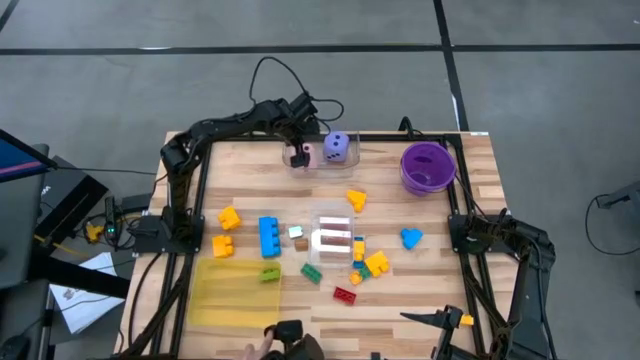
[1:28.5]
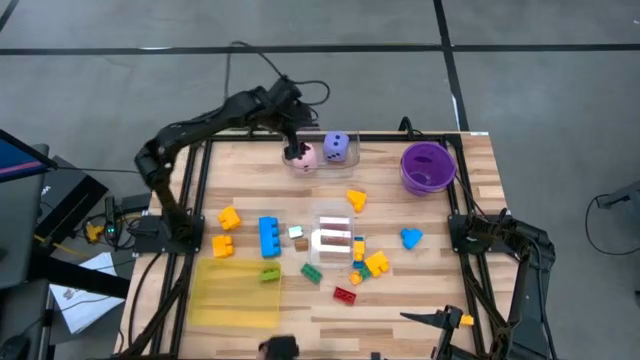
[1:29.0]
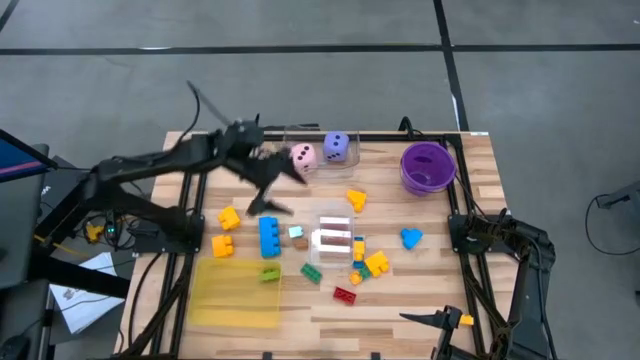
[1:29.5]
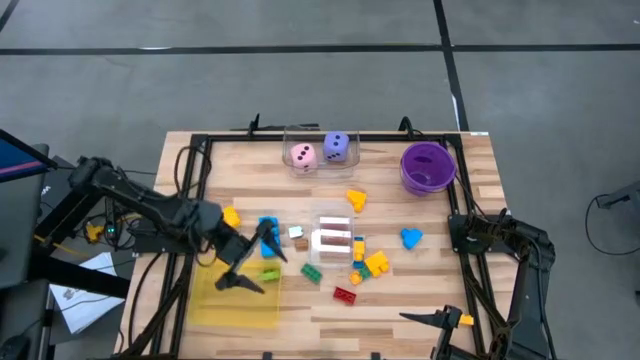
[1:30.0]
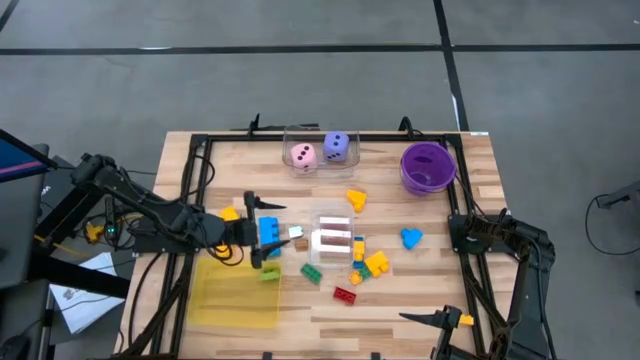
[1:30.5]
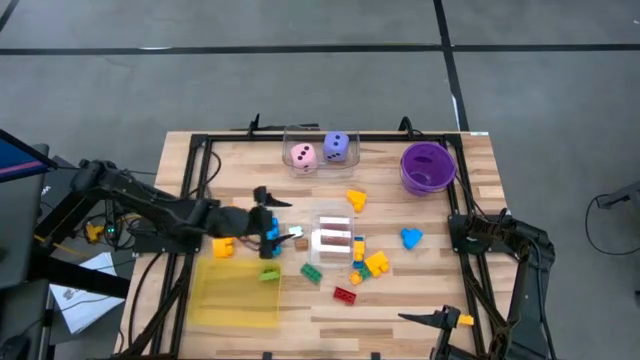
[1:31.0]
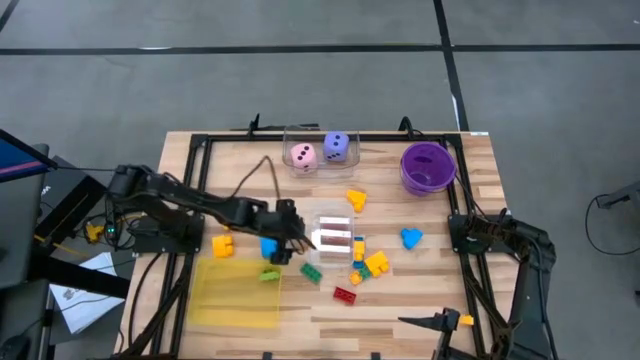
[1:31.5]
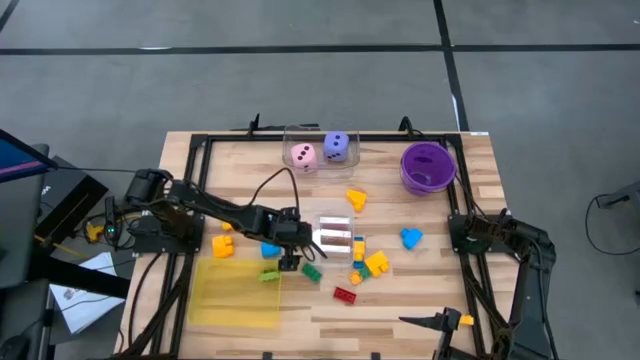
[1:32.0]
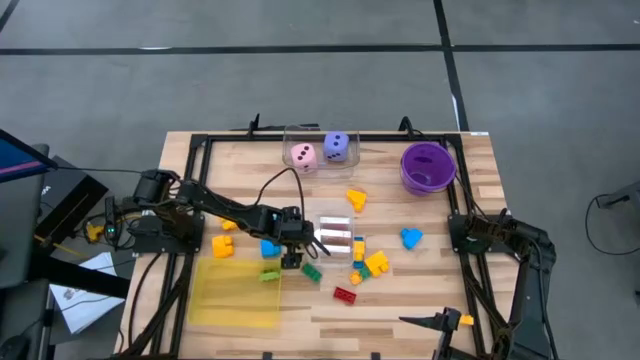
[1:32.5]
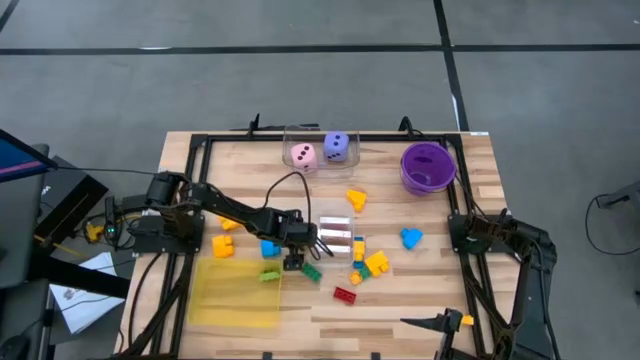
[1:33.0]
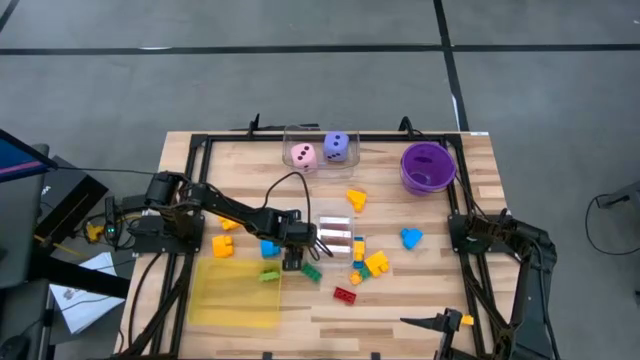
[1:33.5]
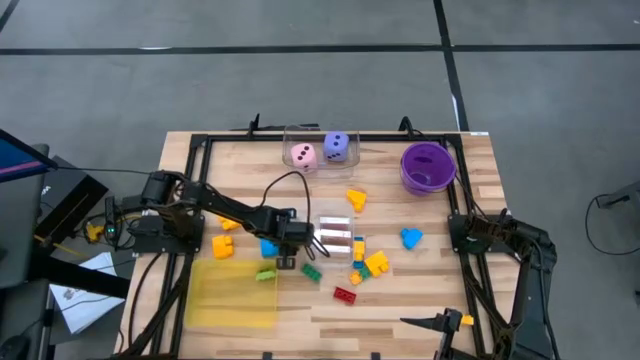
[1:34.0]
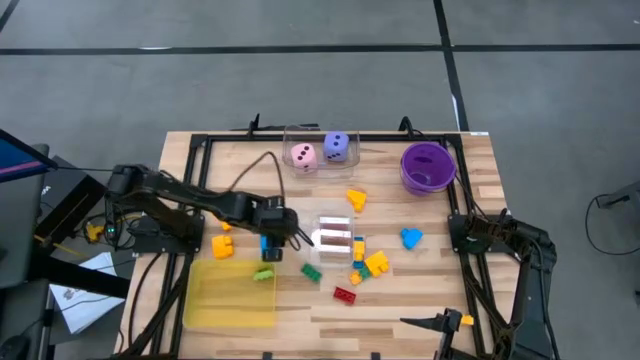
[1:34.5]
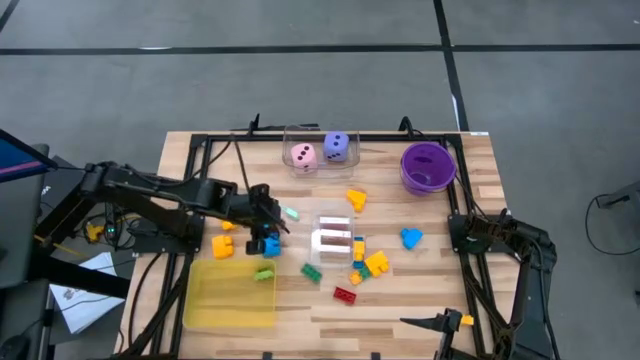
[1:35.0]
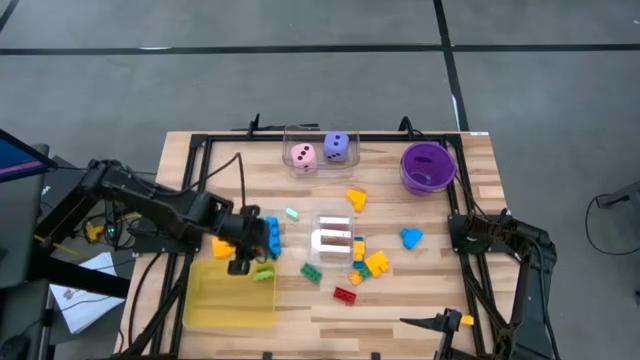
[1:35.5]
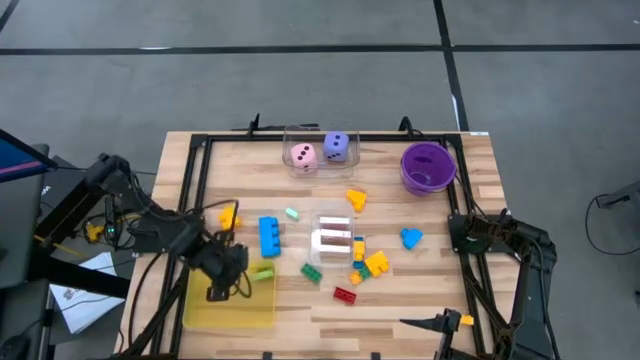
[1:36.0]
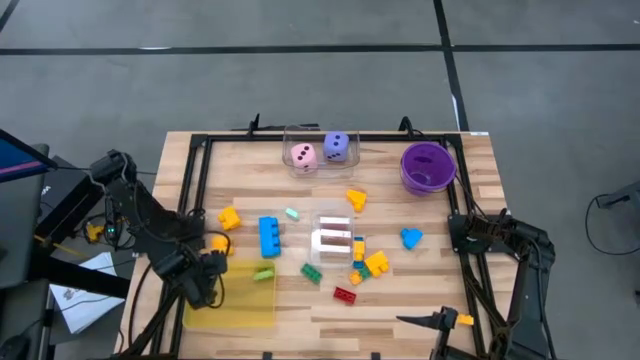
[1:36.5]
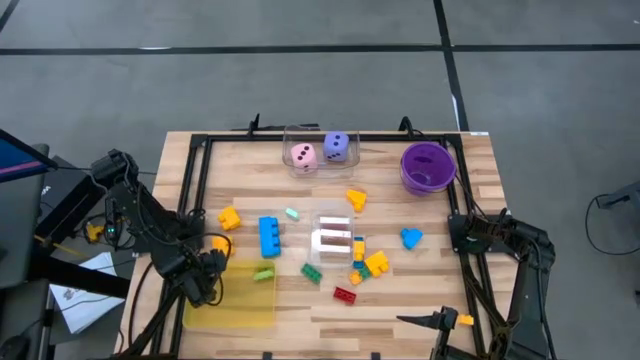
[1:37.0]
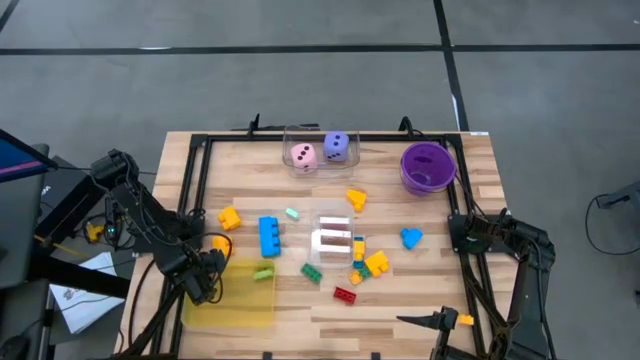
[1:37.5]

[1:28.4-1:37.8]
Task: Pick & Place Toys
Put the brown game piece into the yellow bin

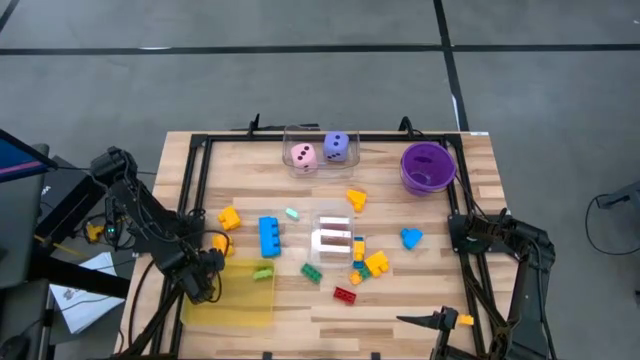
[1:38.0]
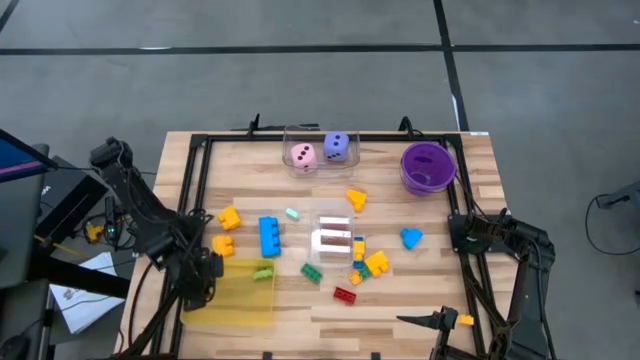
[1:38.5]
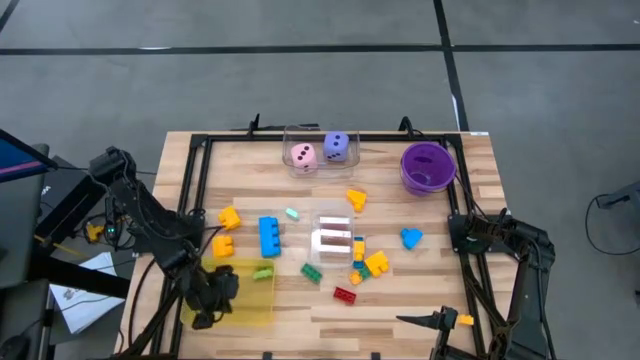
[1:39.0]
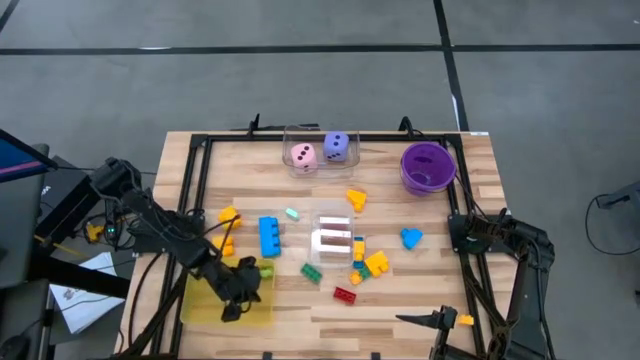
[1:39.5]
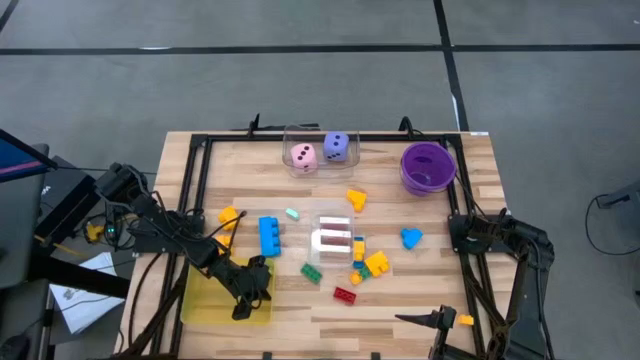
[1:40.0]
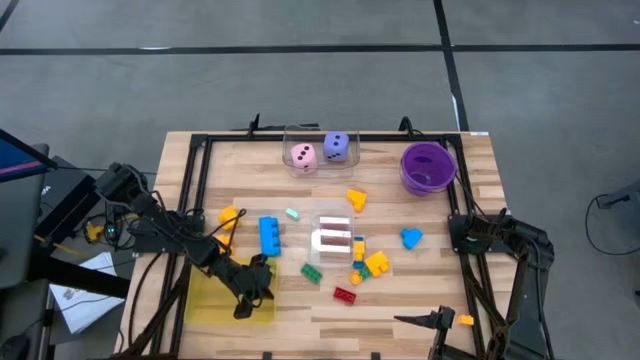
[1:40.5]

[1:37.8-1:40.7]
Adjust the yellow bin on the table

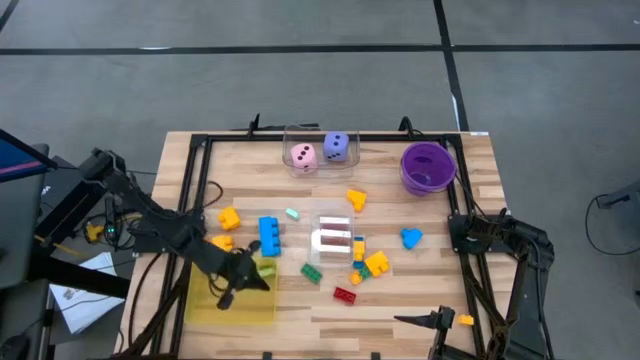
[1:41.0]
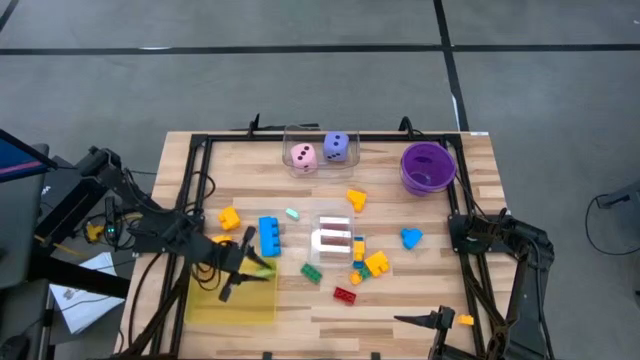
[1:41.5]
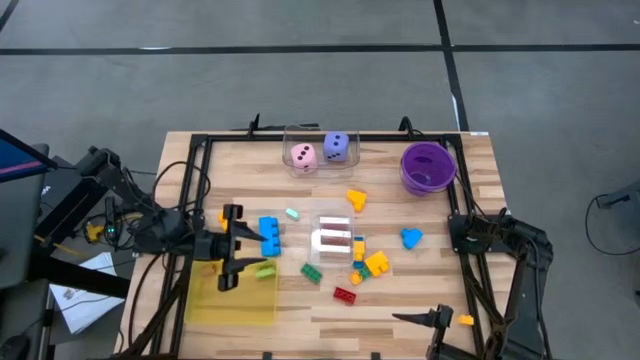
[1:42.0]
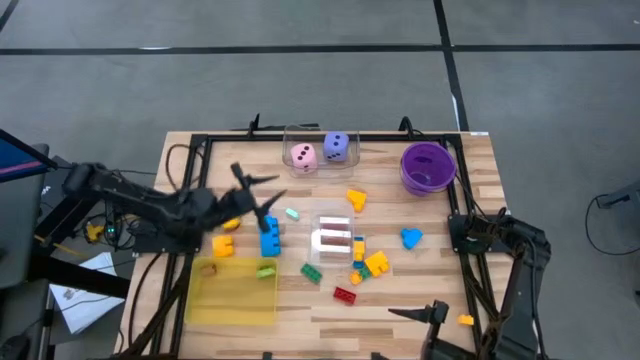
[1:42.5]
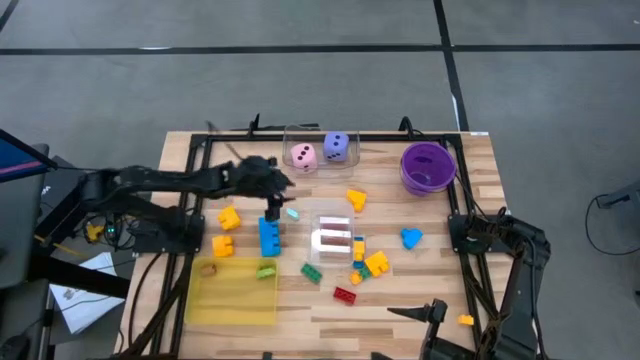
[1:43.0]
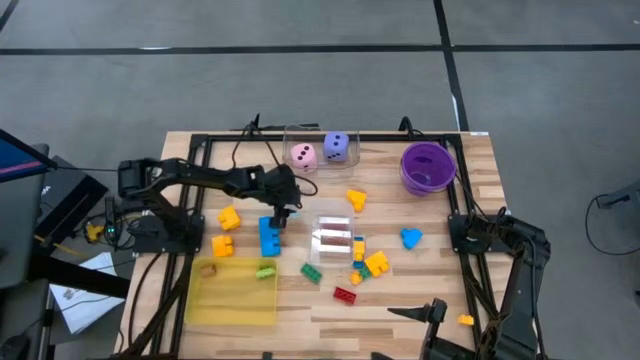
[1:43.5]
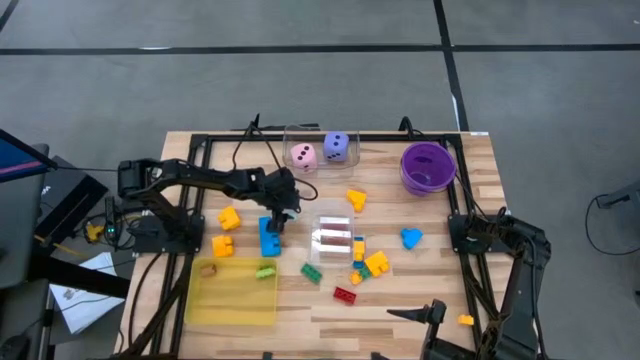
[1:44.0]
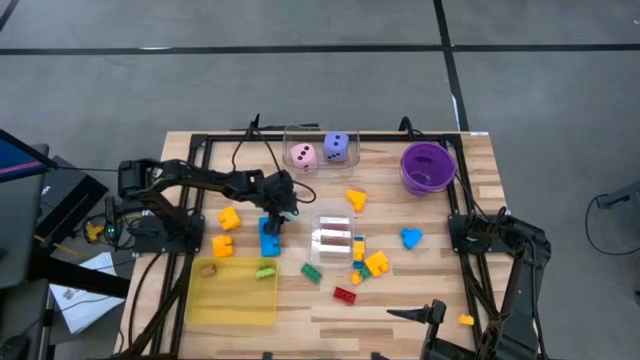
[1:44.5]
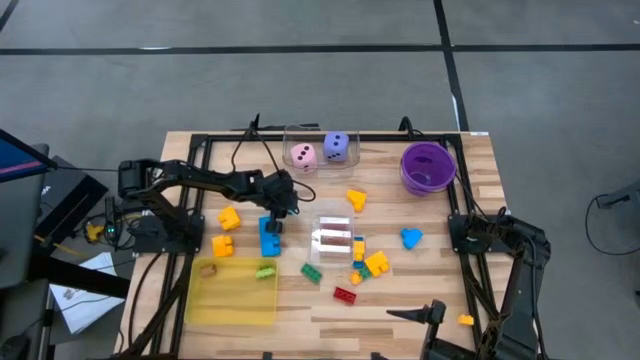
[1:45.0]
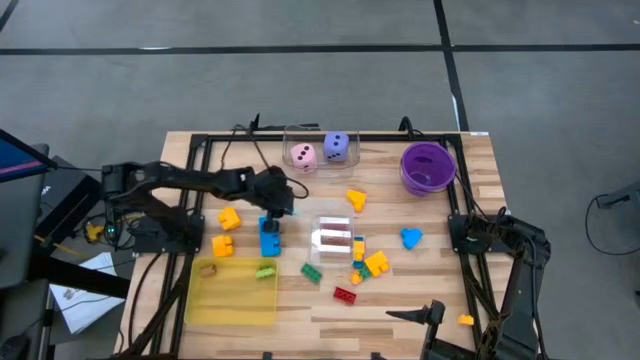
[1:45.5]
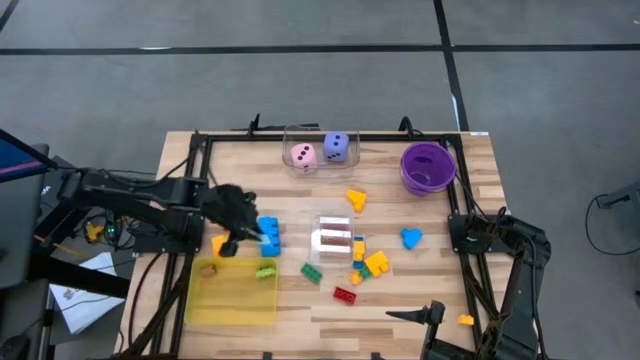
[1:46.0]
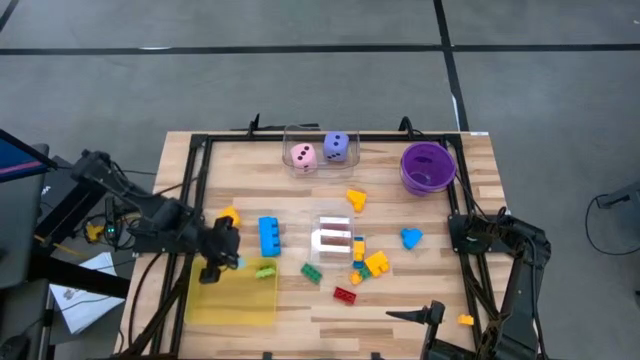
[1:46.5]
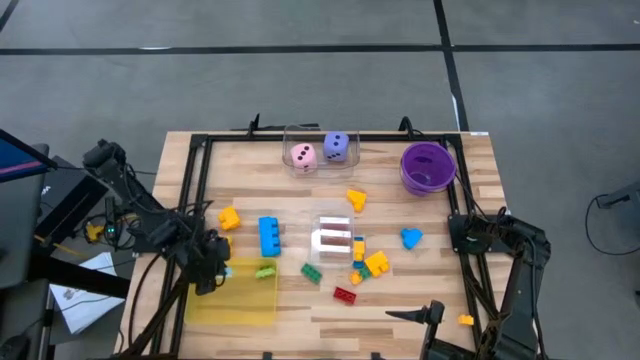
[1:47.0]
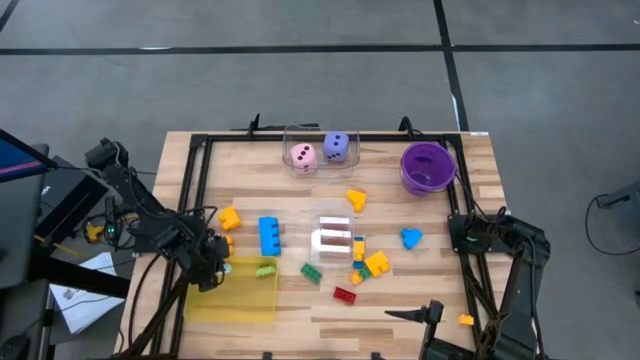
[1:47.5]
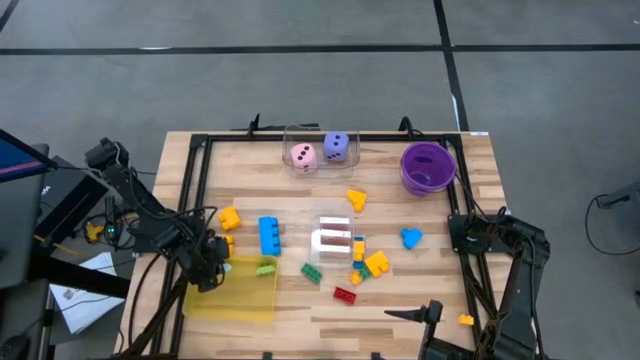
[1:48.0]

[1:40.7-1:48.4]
Put the light blue game piece into the yellow bin

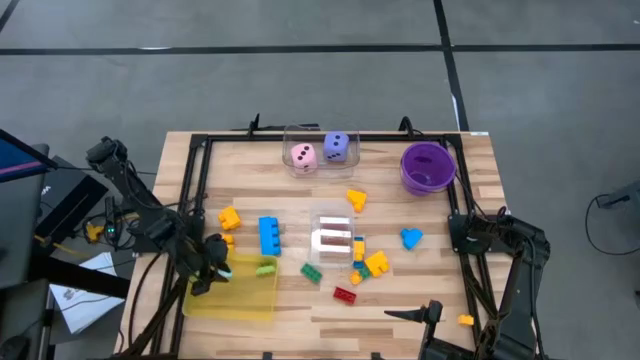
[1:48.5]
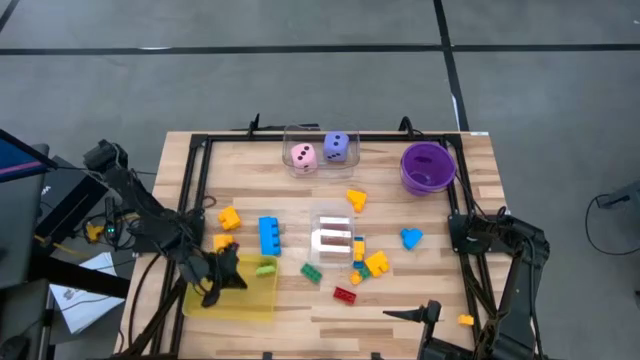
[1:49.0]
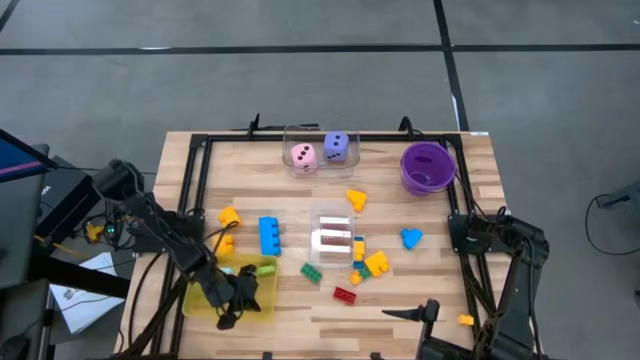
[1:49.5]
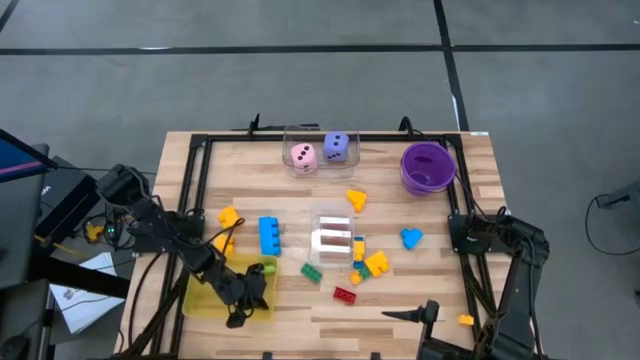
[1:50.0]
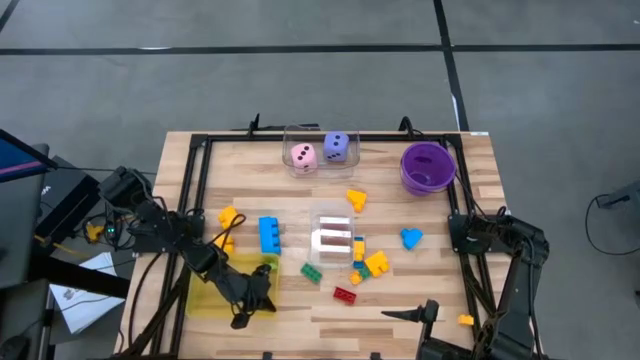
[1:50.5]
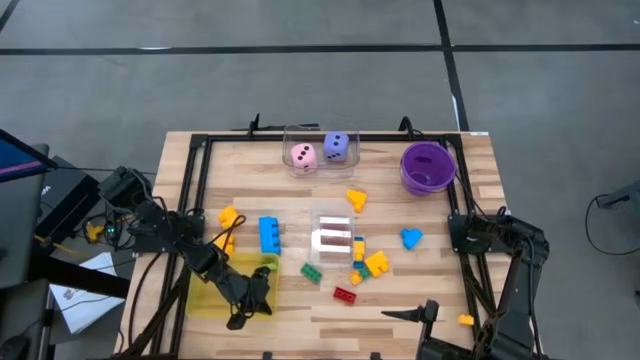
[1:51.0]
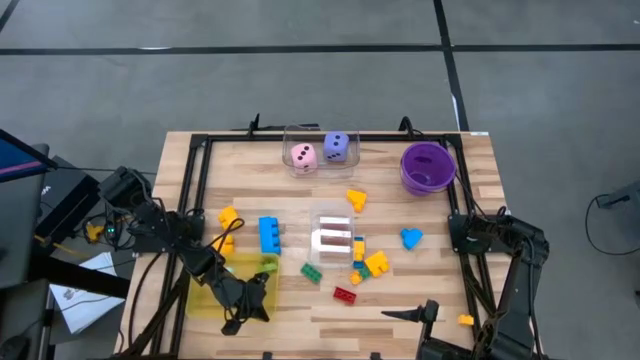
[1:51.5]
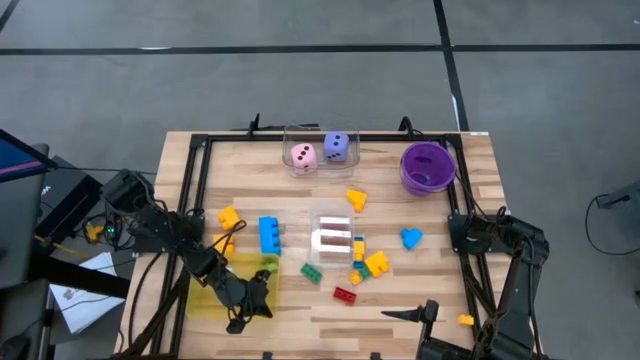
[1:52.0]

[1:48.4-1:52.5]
Adjust the yellow bin on the table
